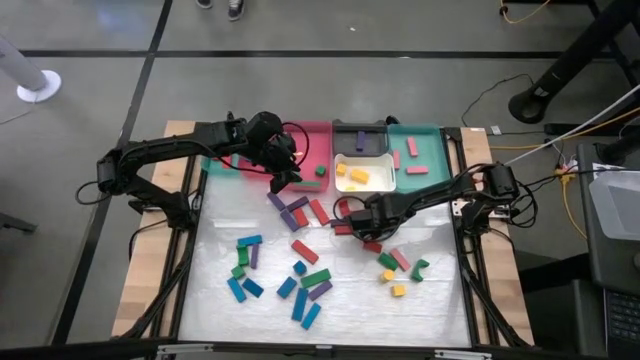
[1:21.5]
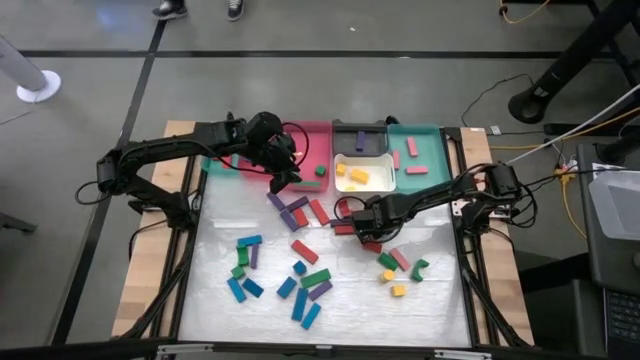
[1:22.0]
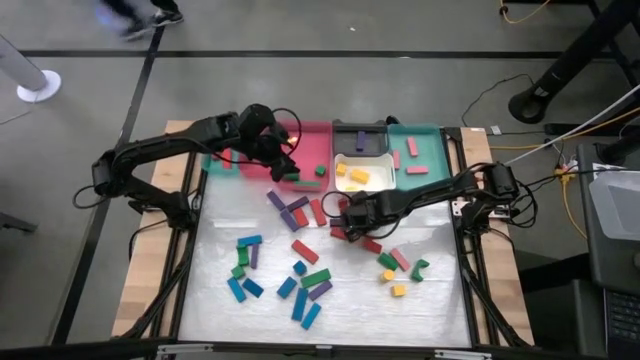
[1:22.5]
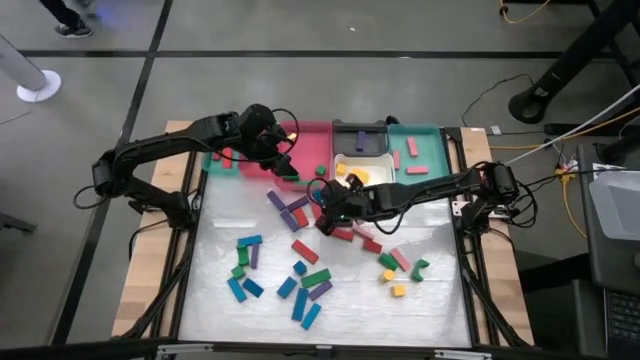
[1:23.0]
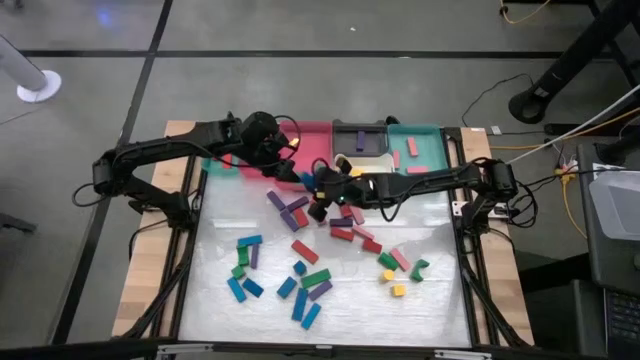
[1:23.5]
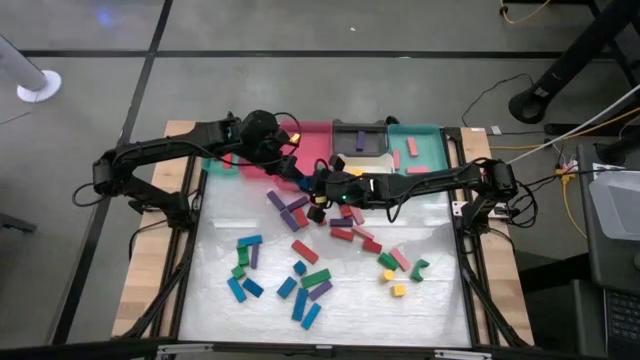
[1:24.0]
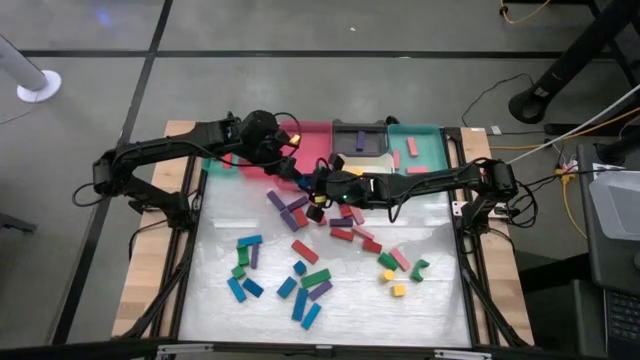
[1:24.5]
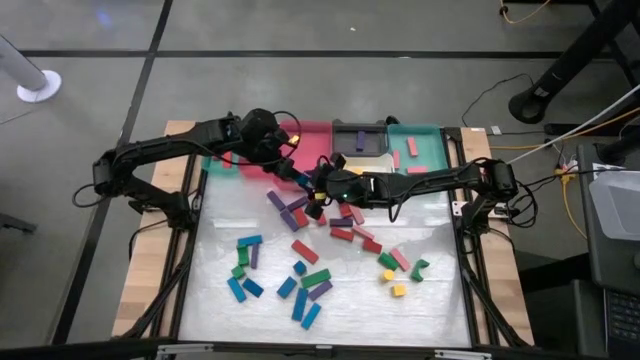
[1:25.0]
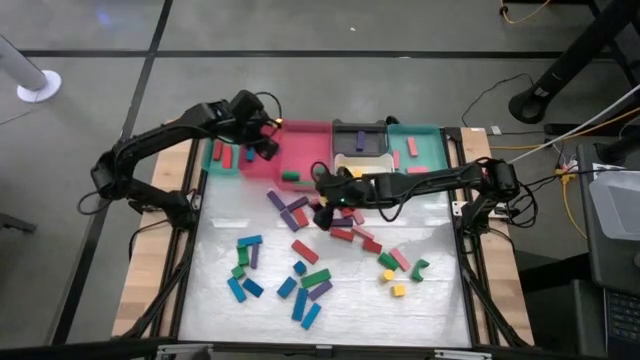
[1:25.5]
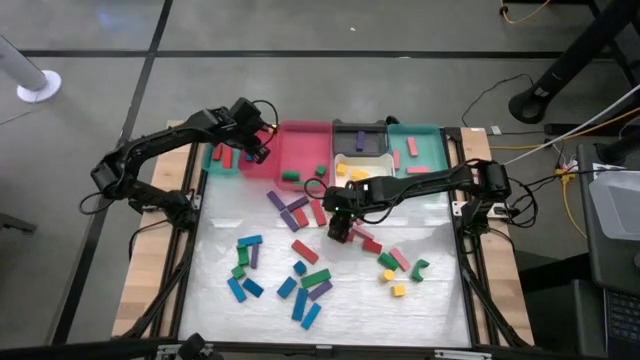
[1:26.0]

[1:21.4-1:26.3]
Task: Sort blocks
Put the blue block into the left pink bin

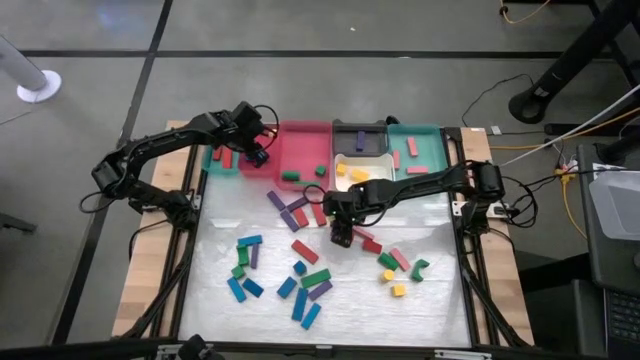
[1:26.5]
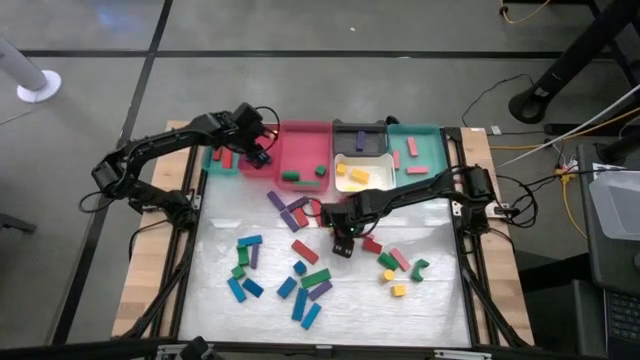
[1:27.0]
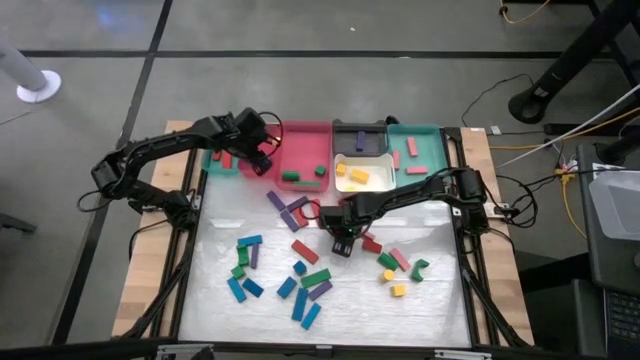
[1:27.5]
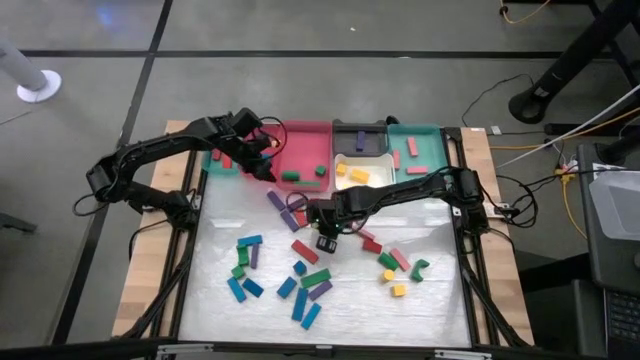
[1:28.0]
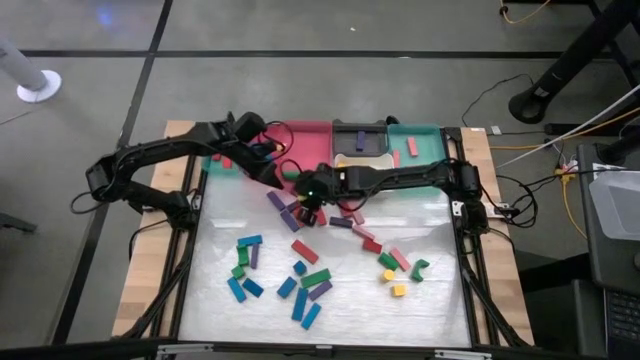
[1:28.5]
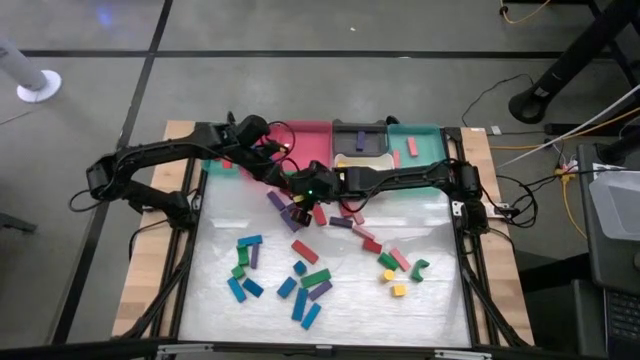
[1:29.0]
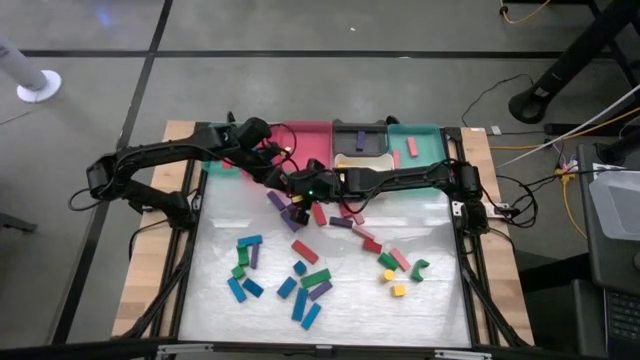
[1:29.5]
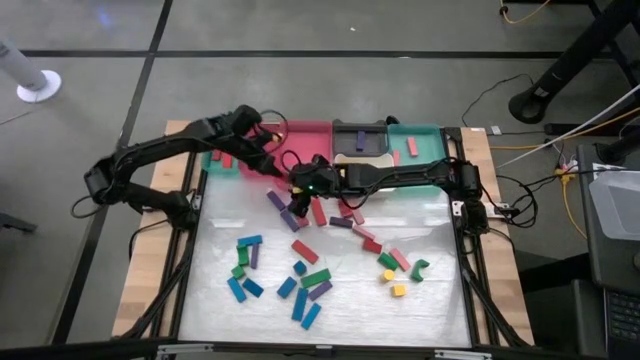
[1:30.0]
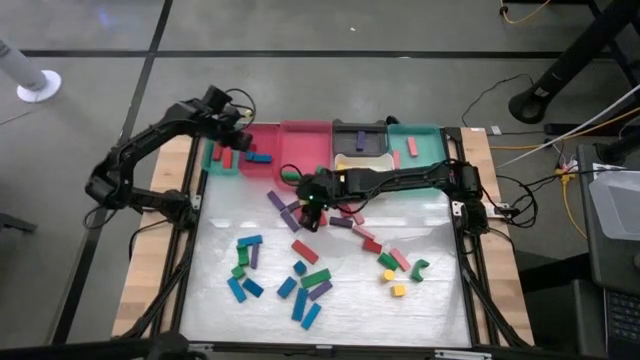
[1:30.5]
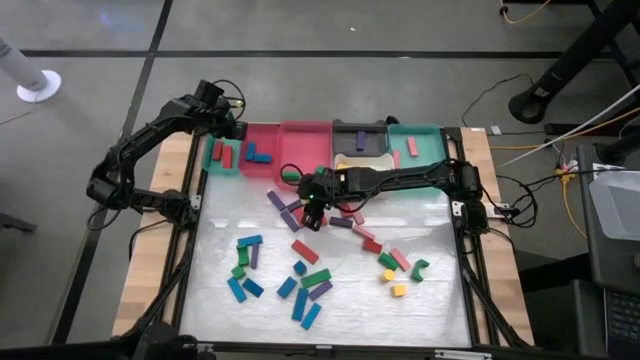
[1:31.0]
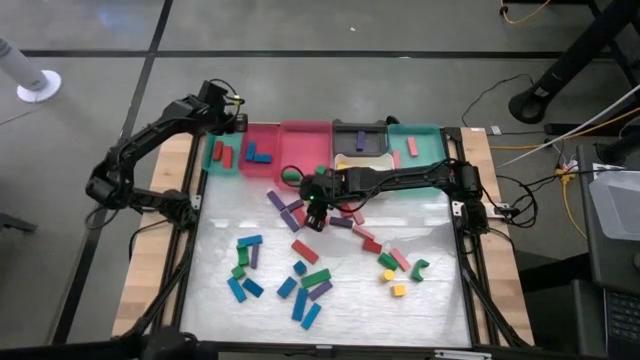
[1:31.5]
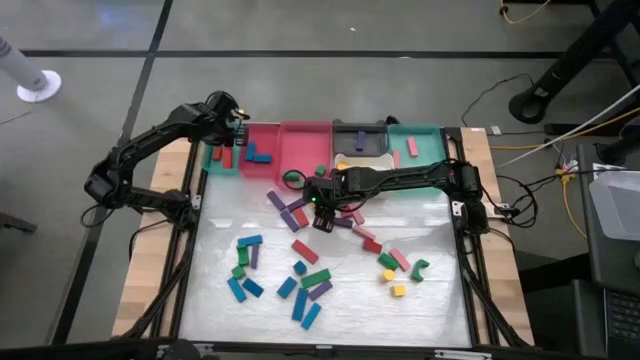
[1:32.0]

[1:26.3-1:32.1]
Put the red block into the left green bin

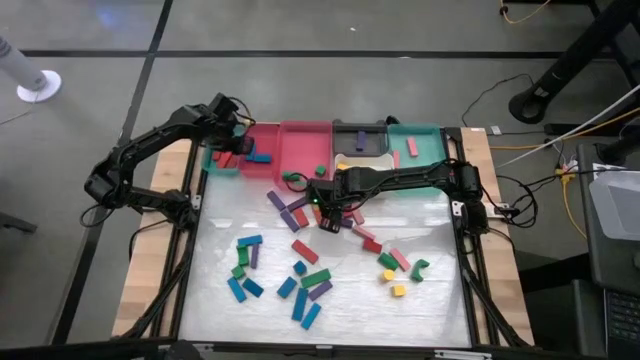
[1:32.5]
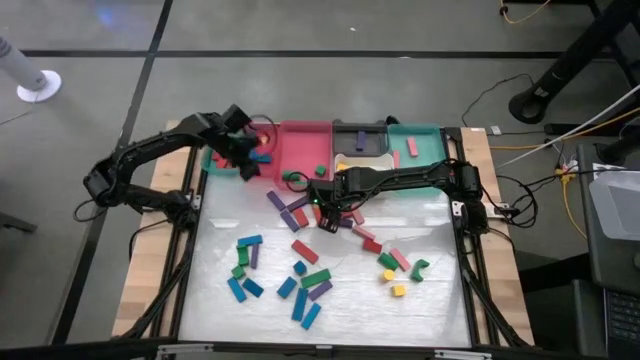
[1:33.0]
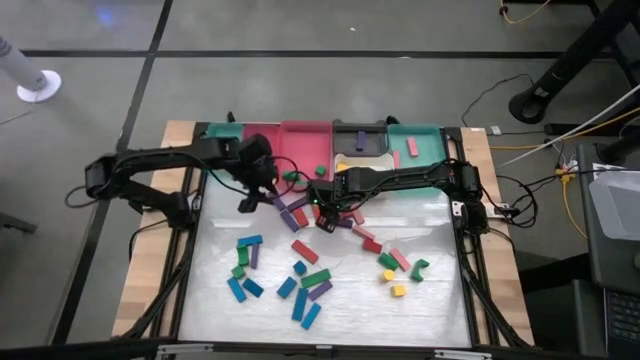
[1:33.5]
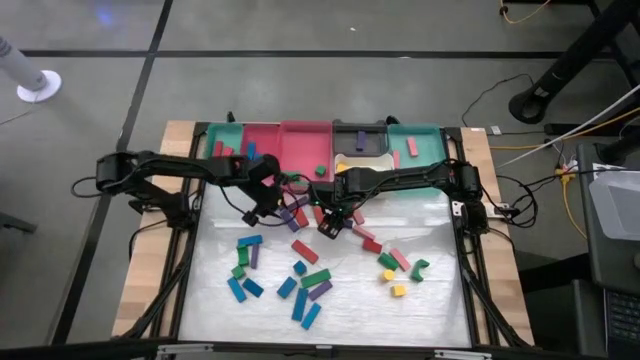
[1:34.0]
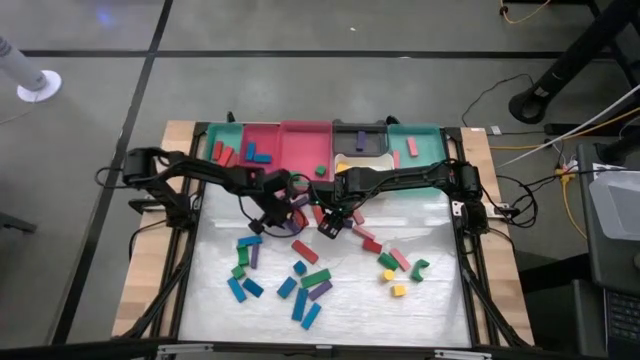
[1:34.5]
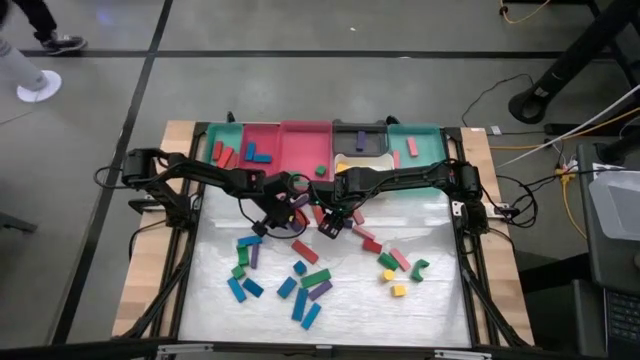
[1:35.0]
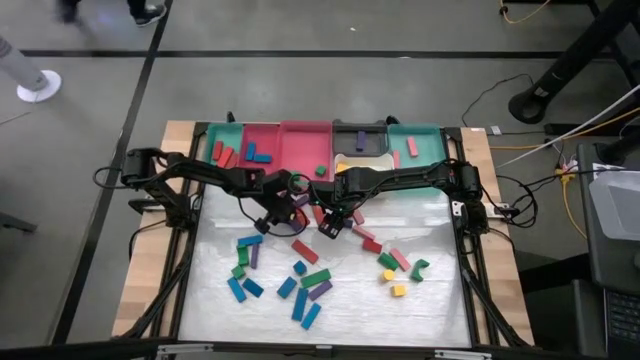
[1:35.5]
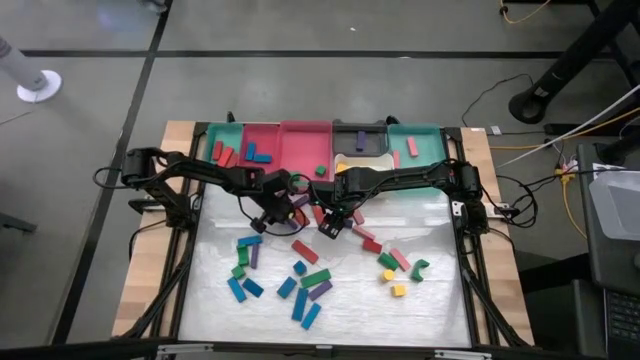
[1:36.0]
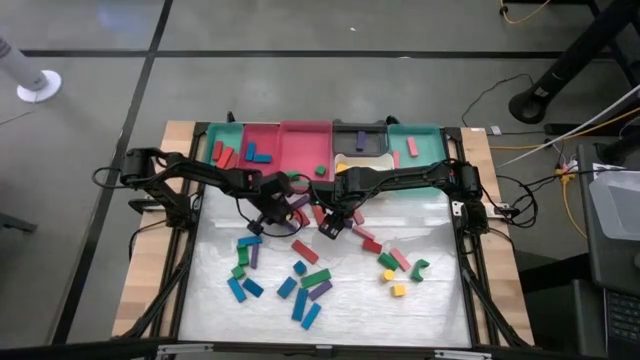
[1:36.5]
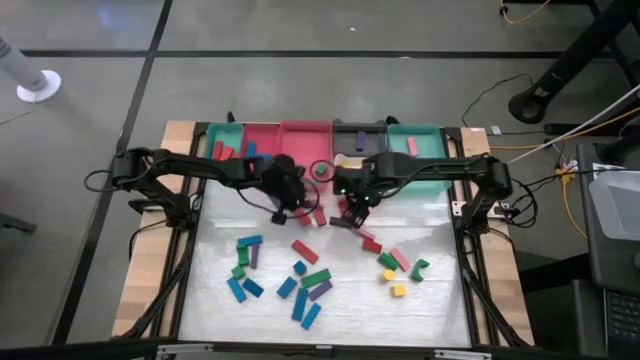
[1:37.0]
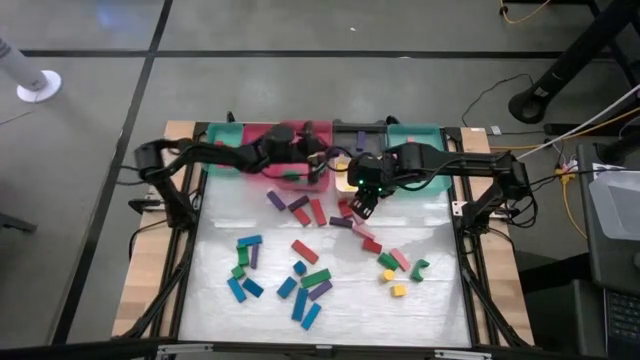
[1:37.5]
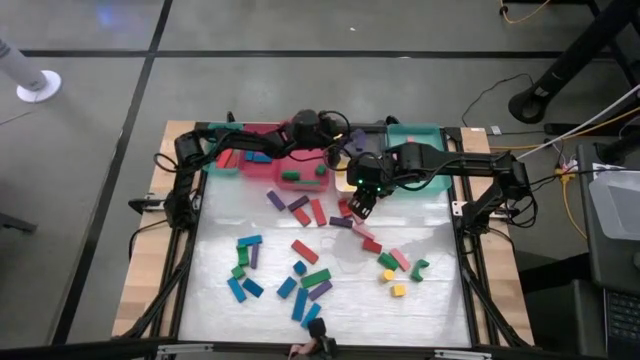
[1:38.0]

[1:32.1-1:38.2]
Put the violet block into the black bin

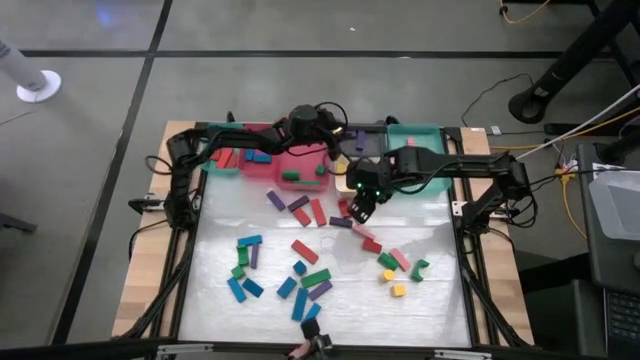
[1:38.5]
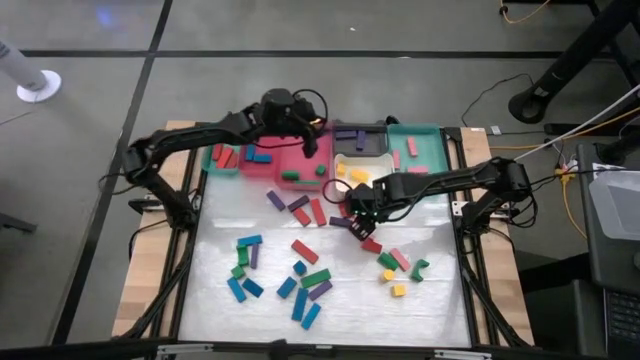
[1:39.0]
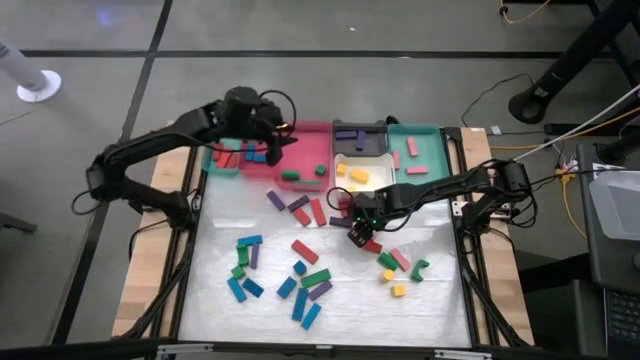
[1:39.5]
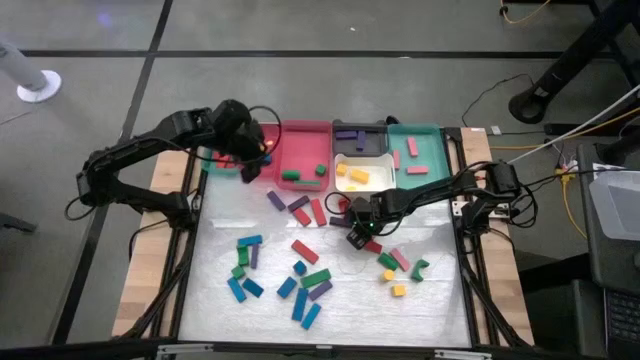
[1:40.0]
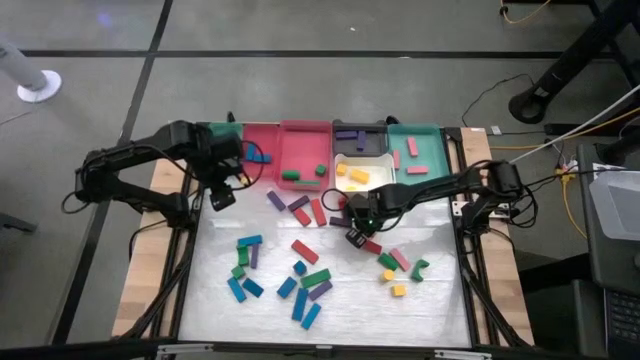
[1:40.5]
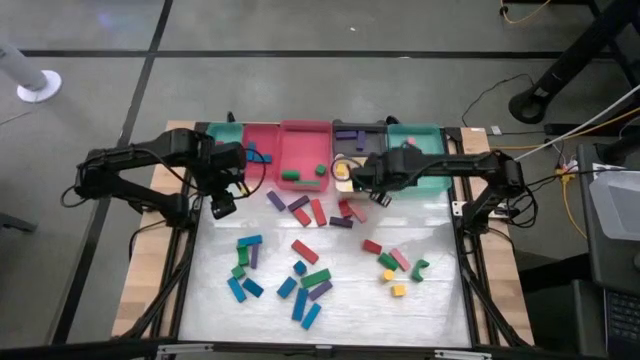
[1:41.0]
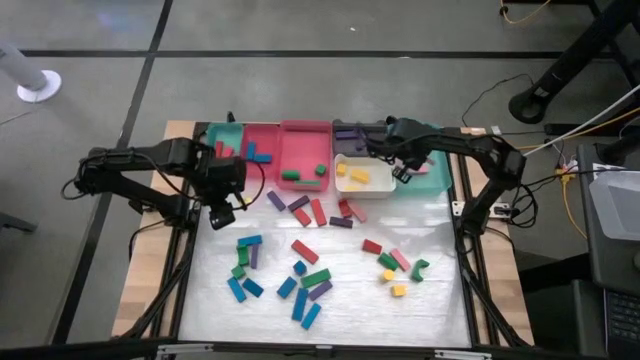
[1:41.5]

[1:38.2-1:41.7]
Put the pink block into the right green bin

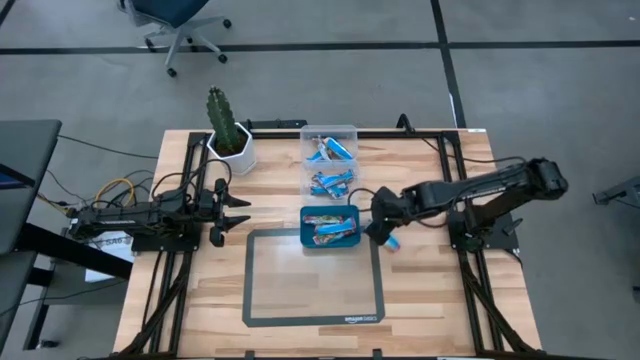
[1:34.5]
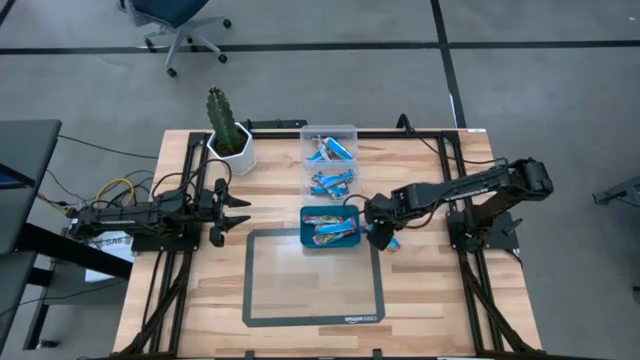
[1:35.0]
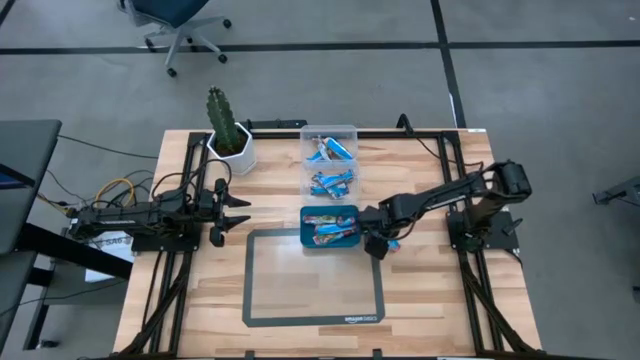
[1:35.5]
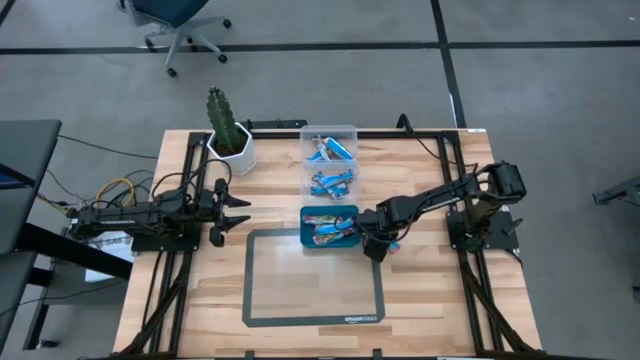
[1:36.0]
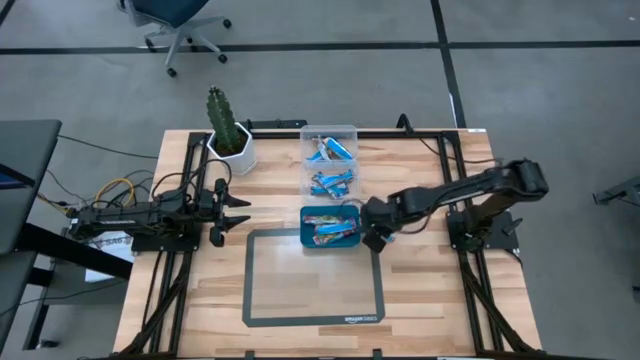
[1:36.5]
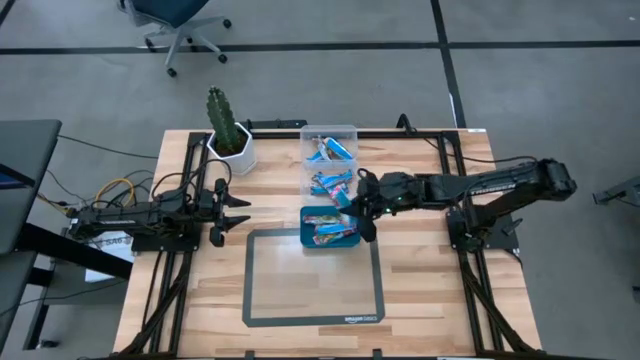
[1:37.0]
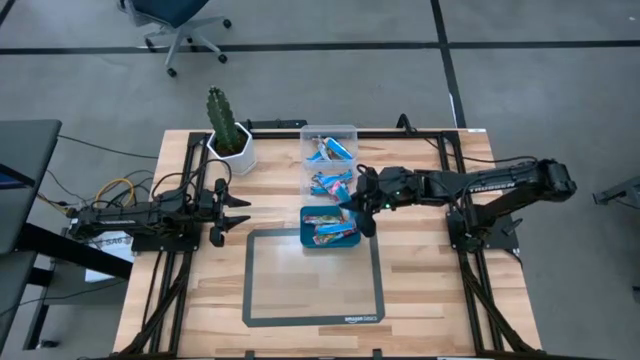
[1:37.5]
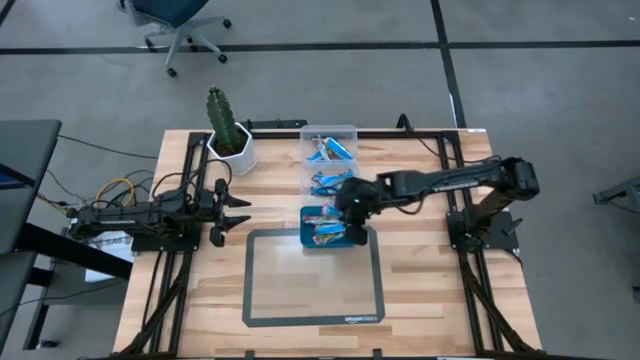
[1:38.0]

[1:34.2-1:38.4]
Task: Pick and place Granola Bars by type
Put the red granola bar into the blue bin
